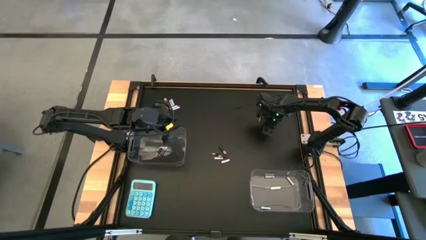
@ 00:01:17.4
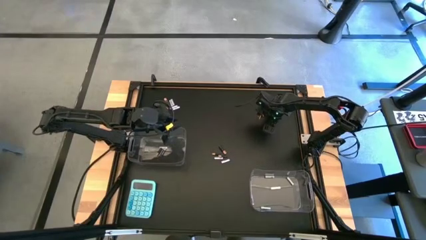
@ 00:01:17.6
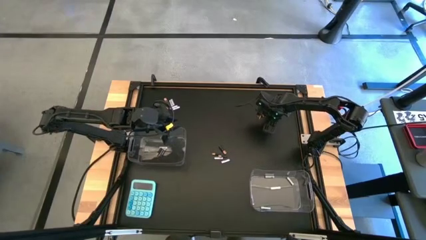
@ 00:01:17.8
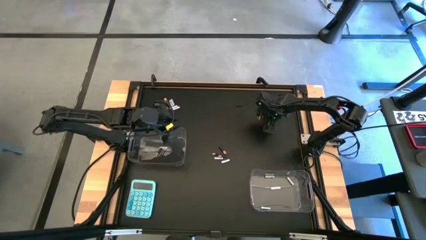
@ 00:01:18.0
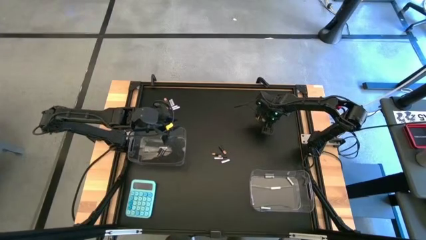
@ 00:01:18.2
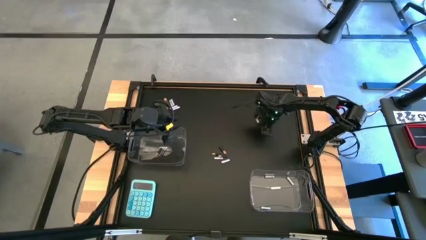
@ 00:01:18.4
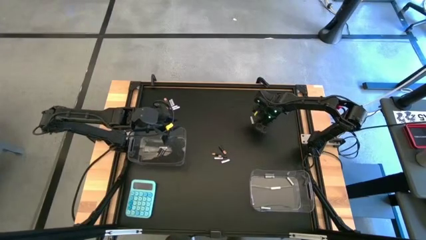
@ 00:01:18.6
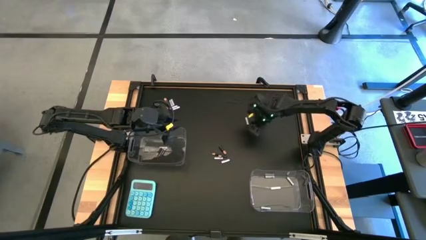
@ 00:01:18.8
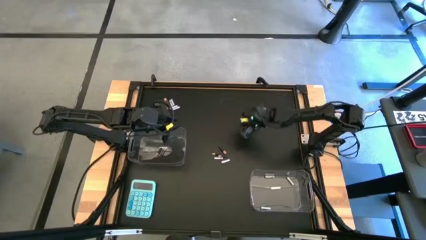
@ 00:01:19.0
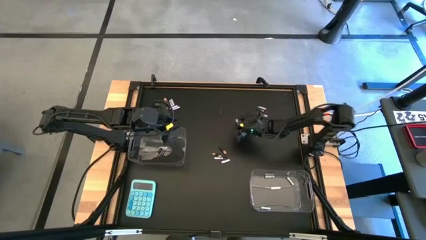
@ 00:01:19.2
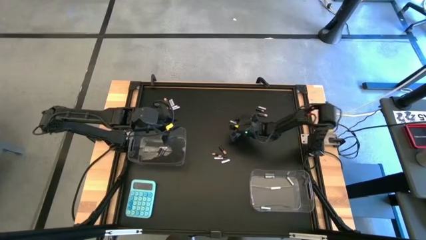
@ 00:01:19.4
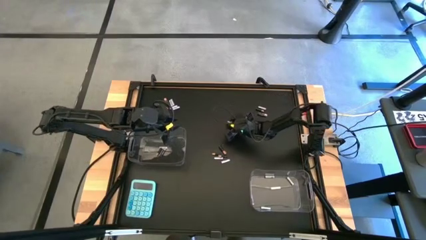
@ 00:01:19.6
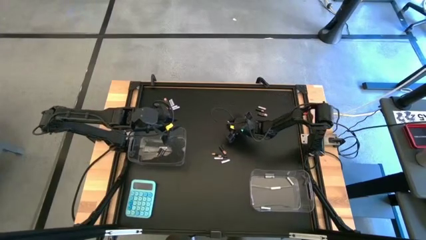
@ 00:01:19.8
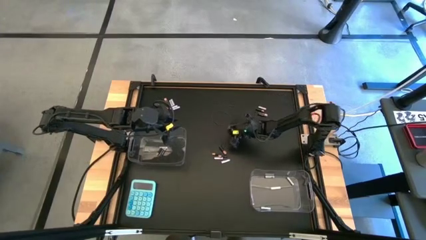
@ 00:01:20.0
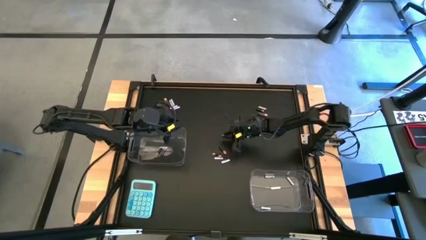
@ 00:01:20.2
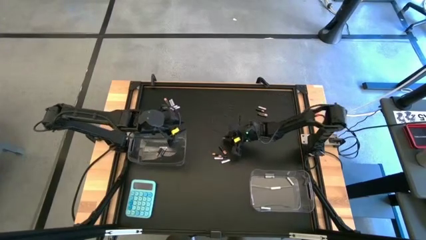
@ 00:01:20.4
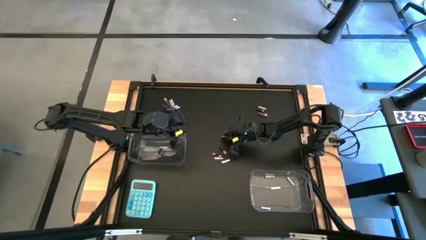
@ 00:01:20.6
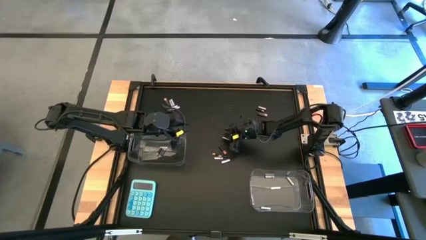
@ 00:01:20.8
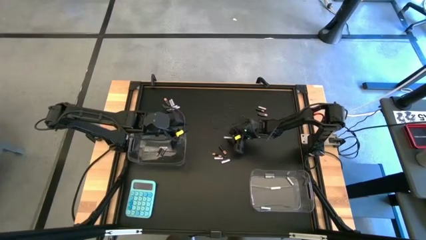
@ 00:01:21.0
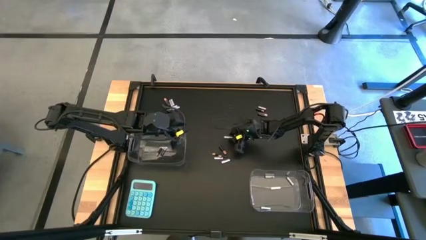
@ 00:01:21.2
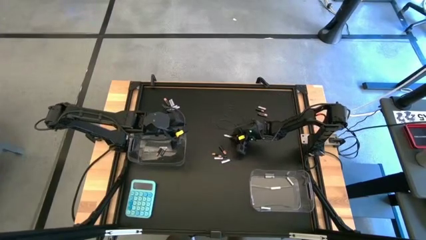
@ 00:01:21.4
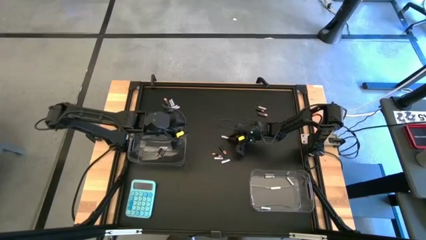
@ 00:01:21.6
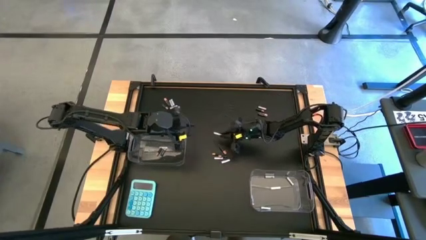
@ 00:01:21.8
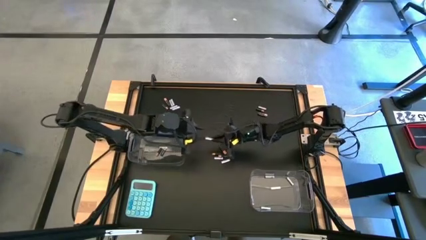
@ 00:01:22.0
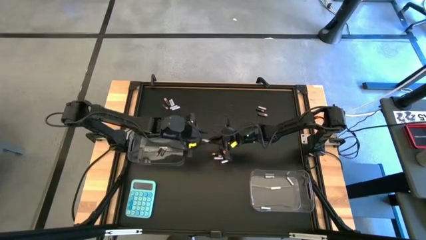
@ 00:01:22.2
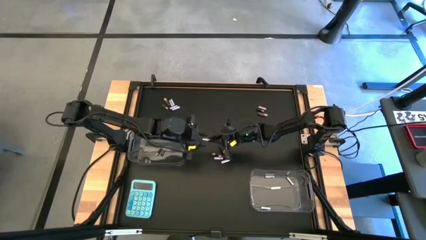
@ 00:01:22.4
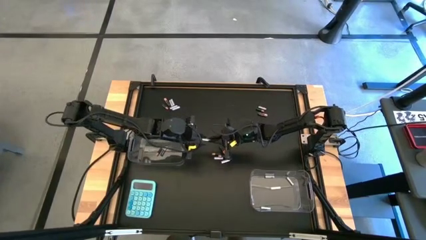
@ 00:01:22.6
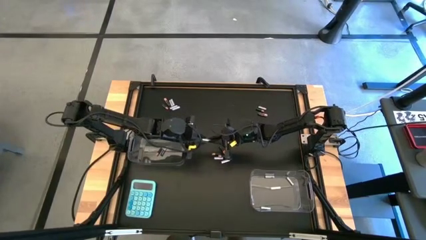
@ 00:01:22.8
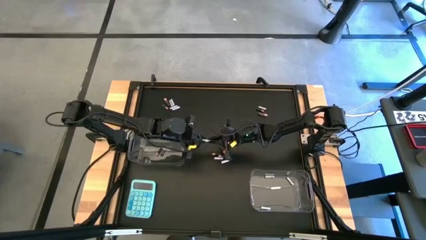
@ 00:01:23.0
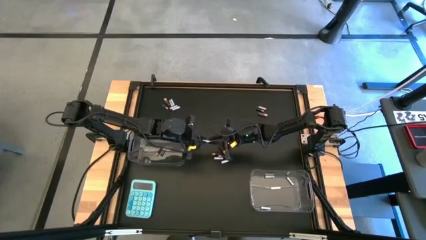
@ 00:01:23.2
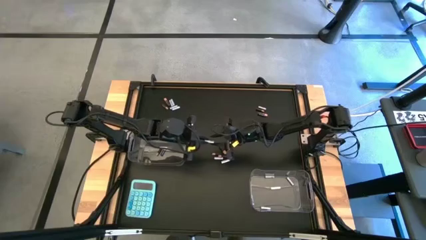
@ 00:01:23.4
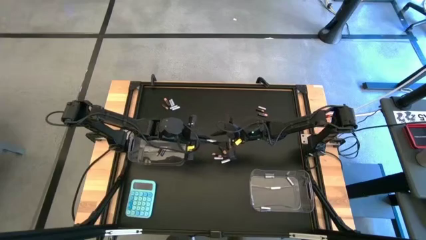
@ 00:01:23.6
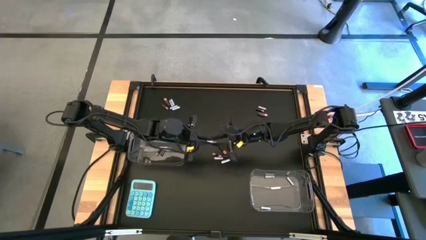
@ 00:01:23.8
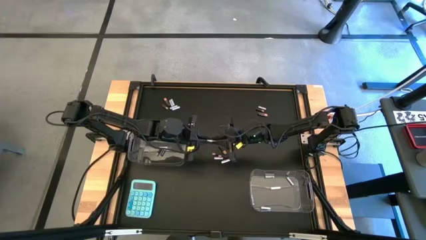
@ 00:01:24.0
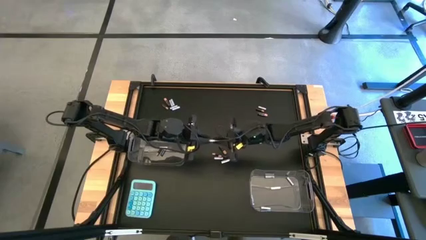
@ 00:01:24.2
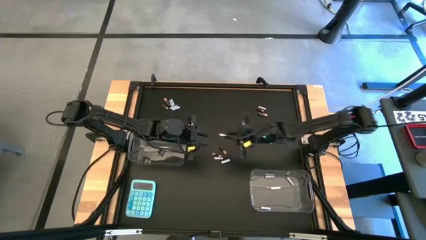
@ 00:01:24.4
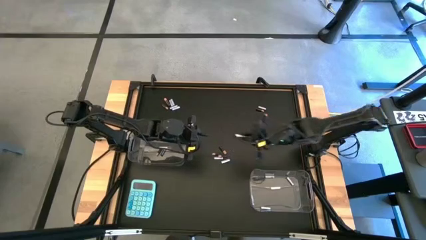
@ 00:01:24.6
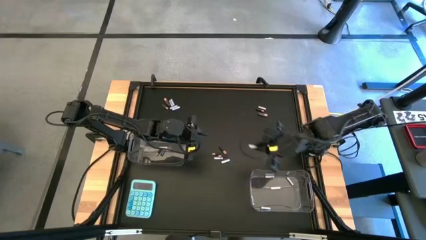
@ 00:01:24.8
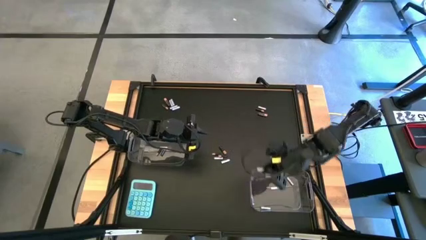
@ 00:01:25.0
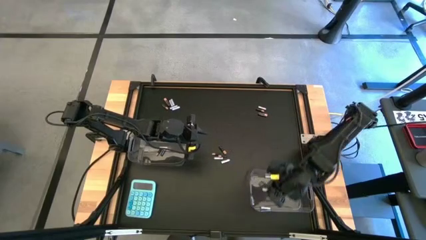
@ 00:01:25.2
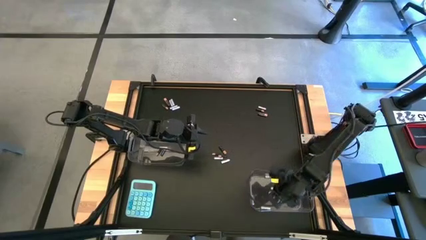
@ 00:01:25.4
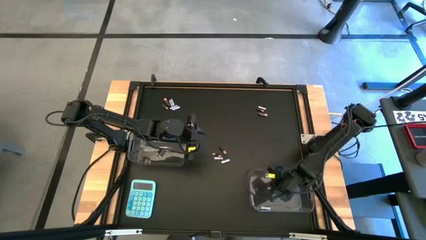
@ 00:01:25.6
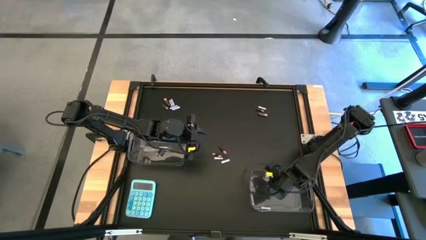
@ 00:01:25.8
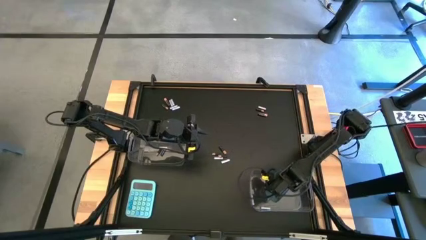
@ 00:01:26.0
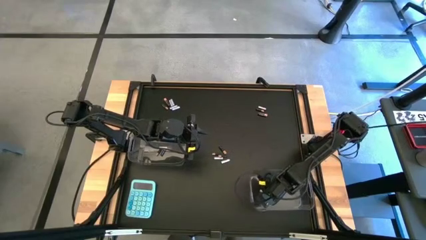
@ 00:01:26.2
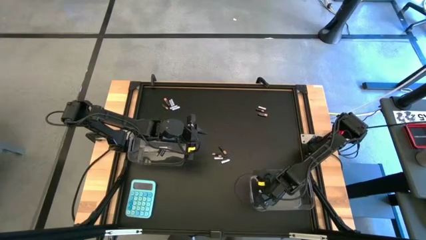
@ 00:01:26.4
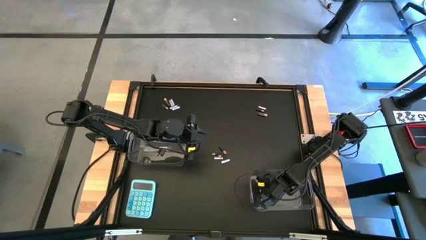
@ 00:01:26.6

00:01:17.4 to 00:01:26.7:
Task: Sort batteries
Put the white battery into the right transparent bin

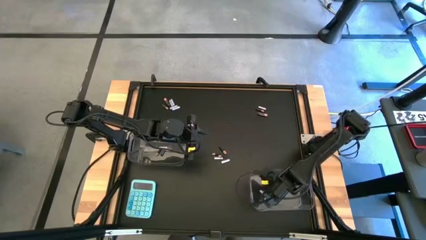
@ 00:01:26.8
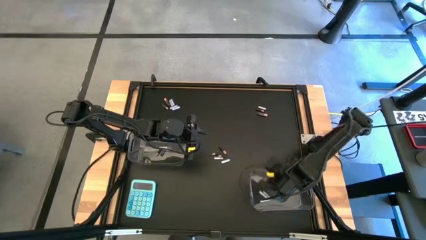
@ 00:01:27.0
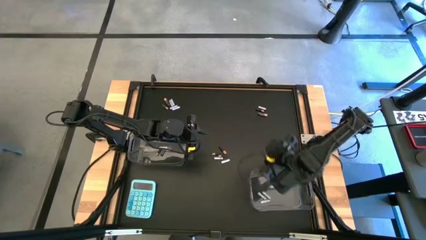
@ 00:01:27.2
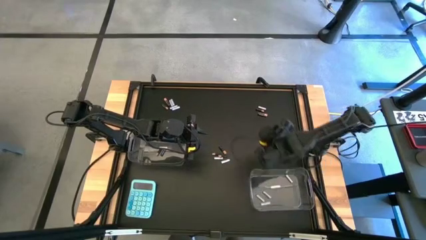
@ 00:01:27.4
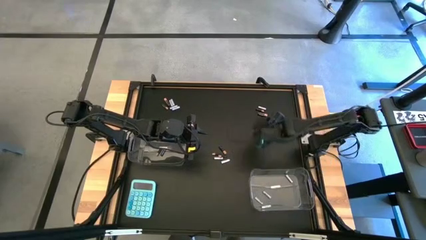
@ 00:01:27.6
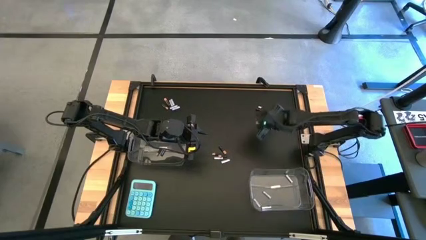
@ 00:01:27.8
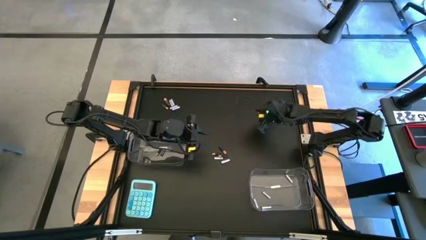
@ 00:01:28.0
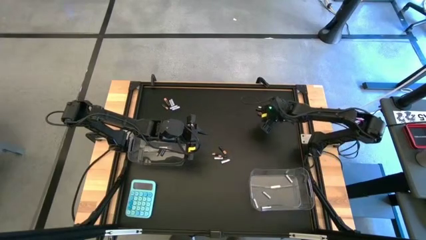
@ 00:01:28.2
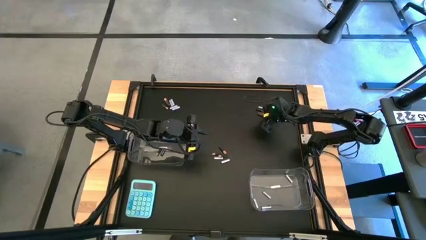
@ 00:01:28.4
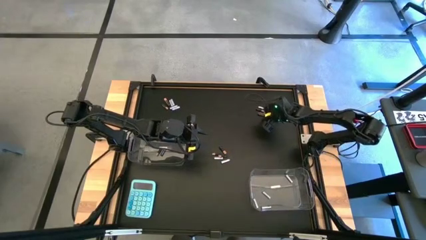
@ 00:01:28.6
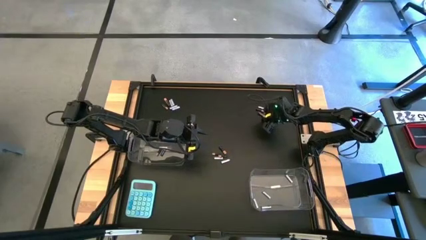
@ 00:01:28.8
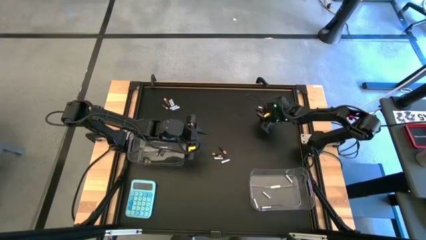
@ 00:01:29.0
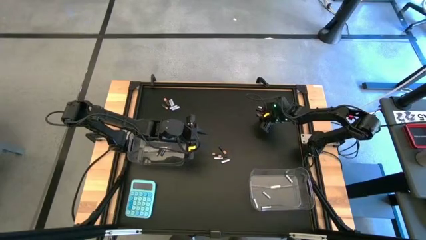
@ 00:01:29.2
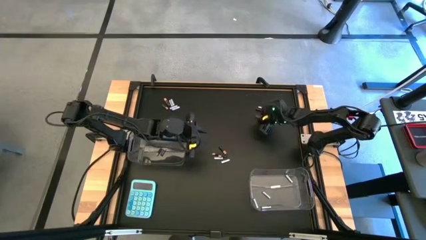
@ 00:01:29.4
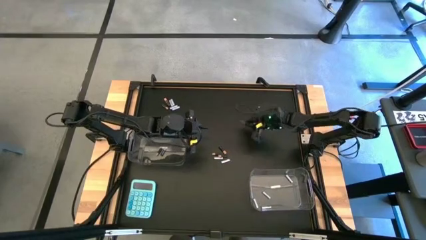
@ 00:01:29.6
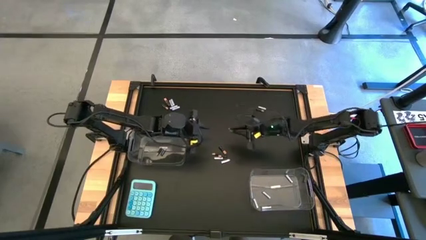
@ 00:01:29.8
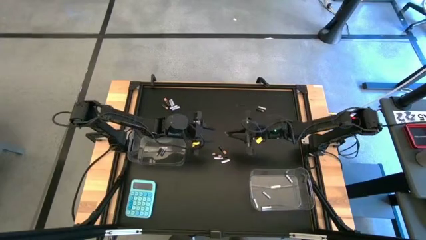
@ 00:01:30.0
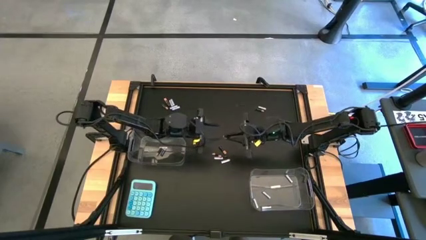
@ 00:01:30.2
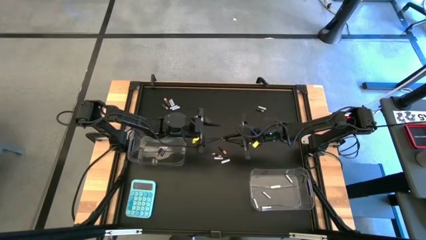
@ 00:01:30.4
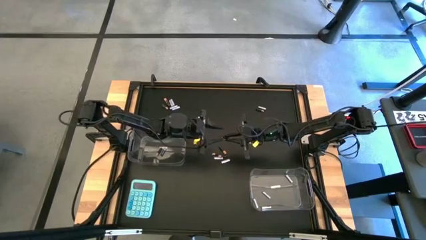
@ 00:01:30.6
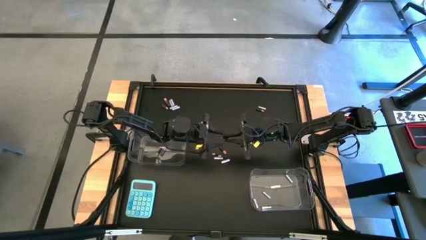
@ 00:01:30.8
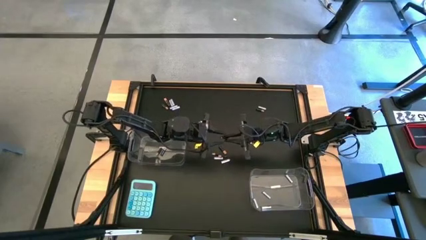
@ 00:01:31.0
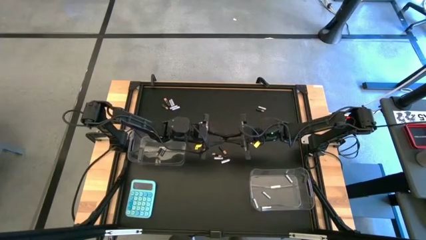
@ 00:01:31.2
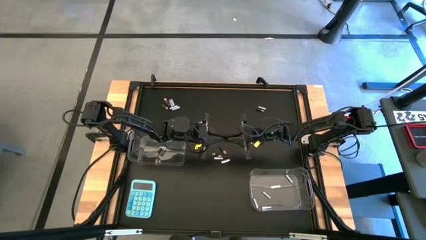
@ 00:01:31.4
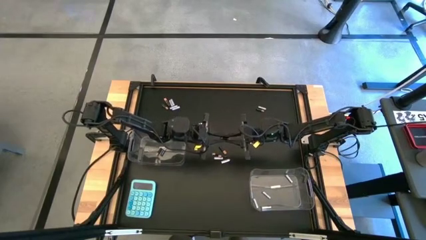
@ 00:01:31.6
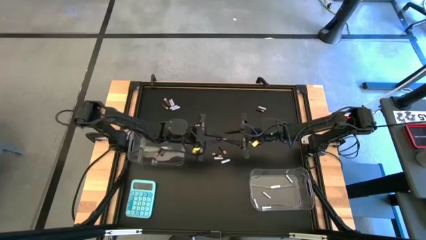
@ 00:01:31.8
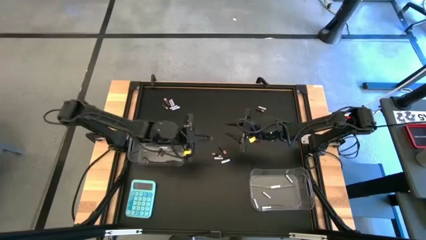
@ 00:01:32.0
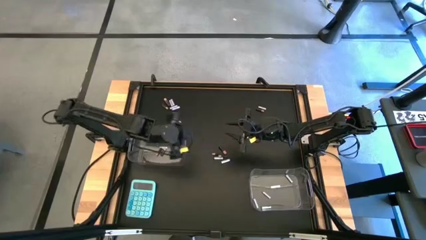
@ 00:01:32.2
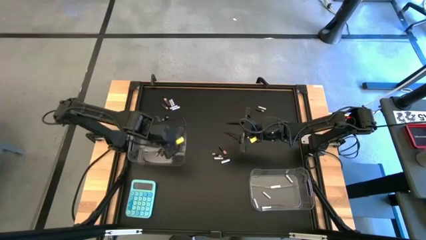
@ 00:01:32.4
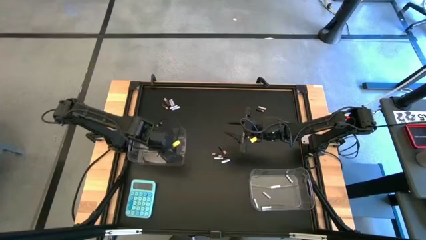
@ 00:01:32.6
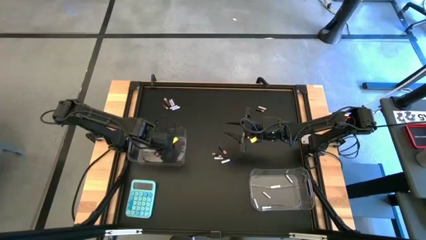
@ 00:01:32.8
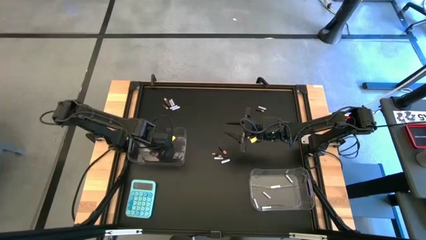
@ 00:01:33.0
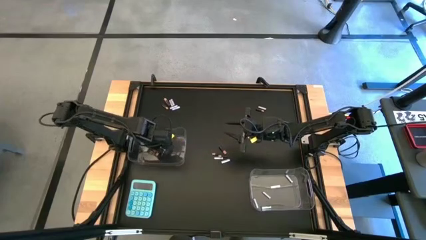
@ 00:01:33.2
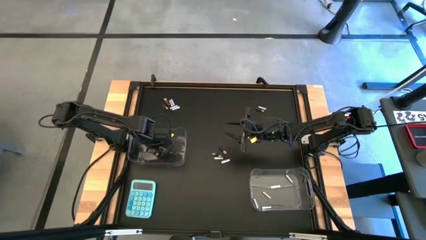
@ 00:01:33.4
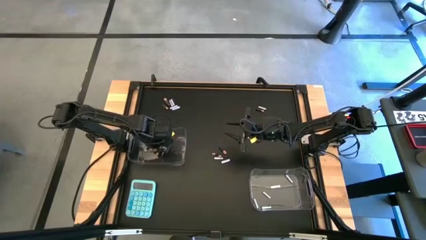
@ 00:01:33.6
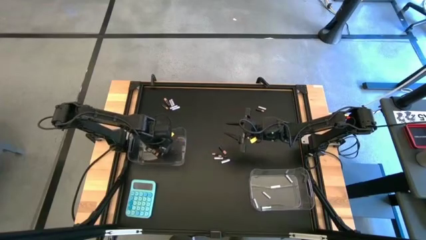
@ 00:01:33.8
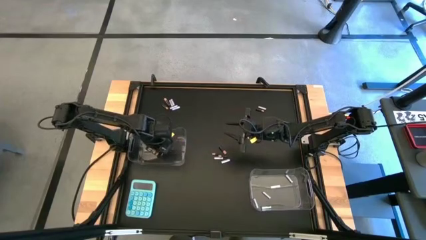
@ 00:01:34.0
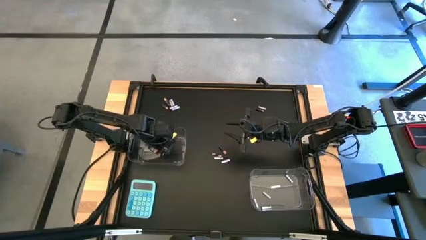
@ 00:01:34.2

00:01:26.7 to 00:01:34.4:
Put the black battery into the left transparent bin
